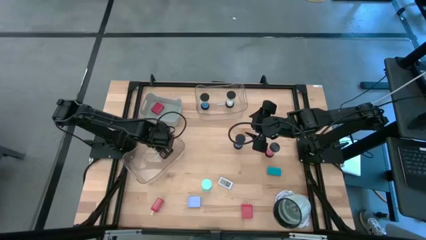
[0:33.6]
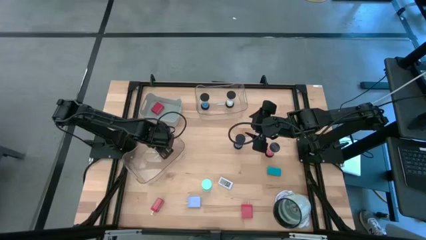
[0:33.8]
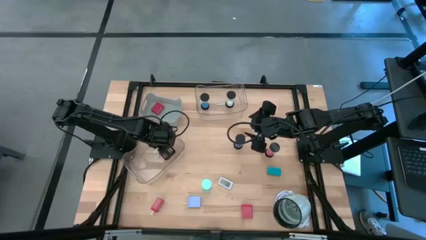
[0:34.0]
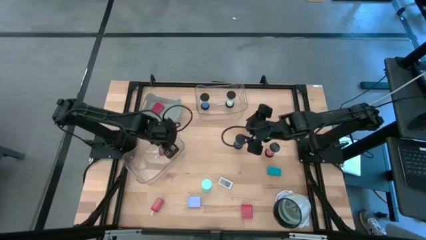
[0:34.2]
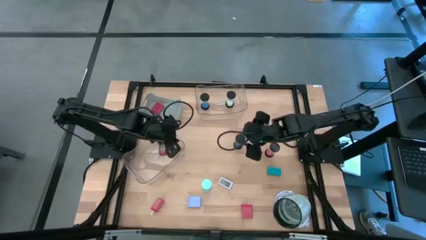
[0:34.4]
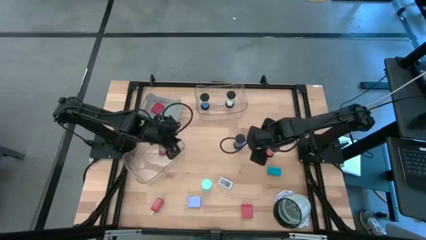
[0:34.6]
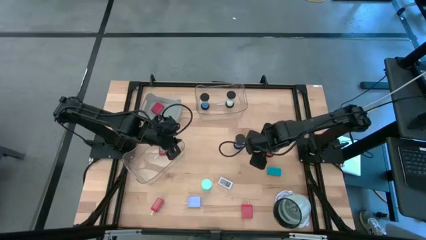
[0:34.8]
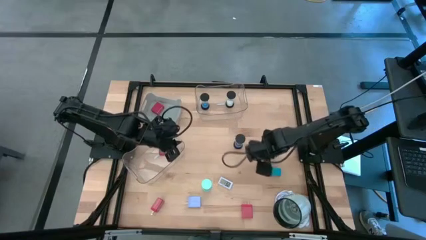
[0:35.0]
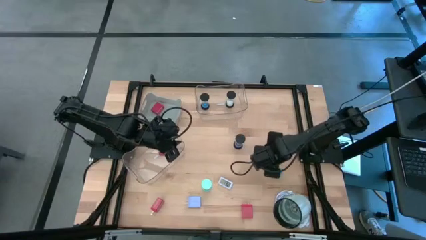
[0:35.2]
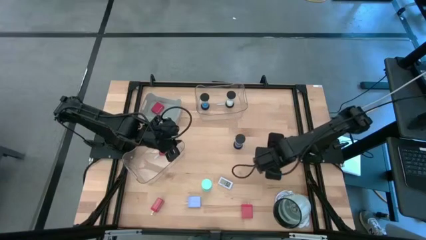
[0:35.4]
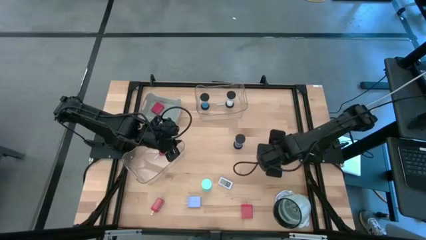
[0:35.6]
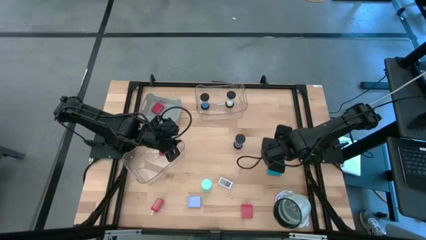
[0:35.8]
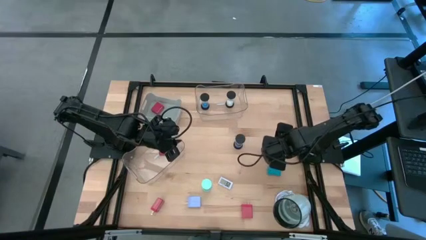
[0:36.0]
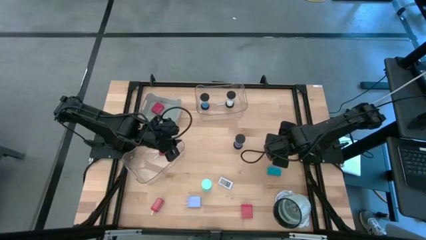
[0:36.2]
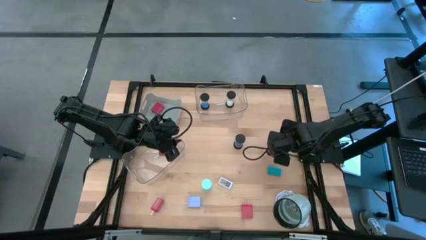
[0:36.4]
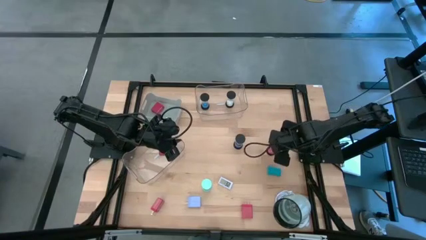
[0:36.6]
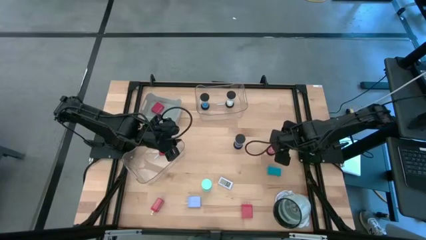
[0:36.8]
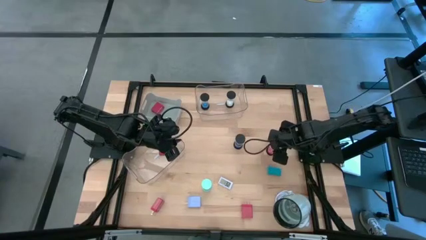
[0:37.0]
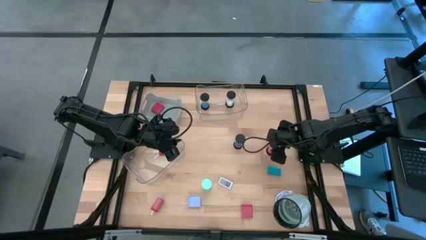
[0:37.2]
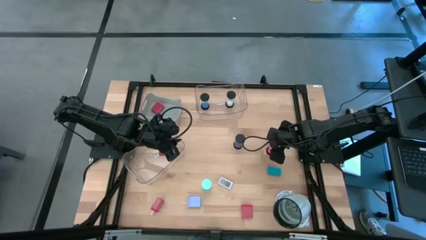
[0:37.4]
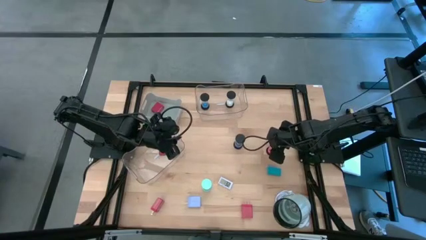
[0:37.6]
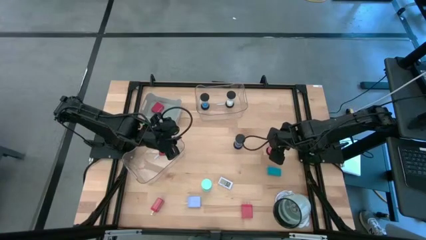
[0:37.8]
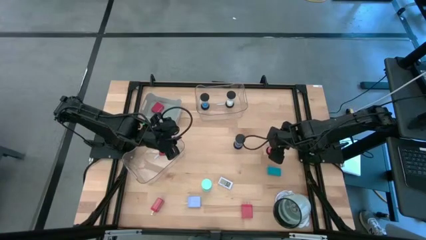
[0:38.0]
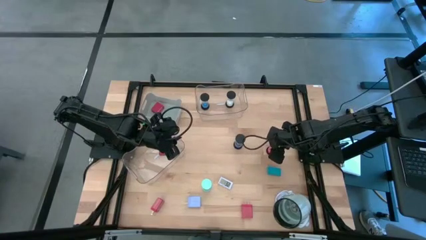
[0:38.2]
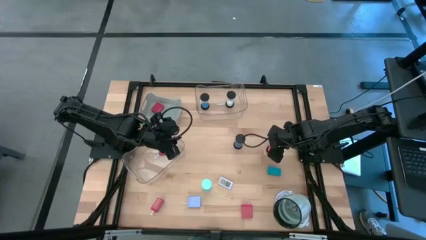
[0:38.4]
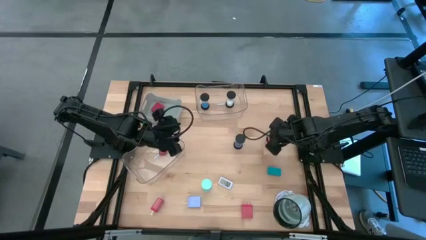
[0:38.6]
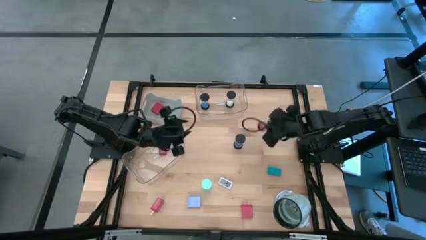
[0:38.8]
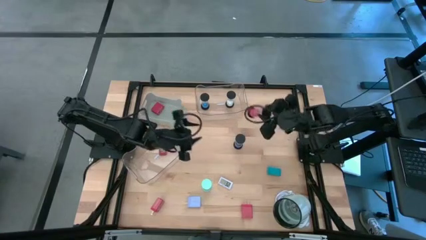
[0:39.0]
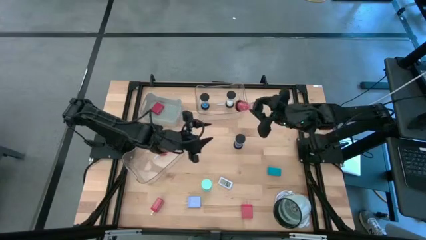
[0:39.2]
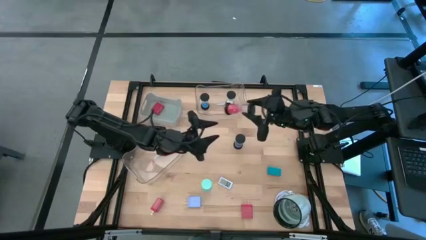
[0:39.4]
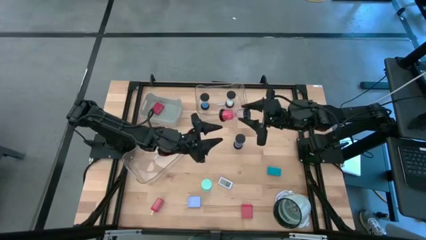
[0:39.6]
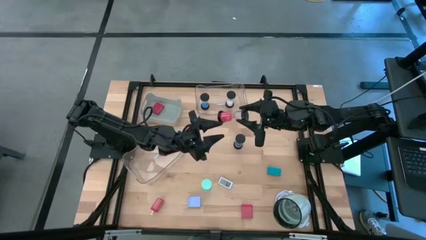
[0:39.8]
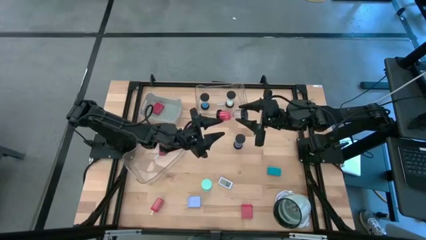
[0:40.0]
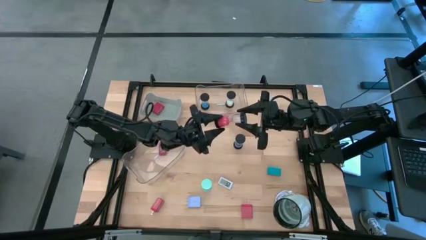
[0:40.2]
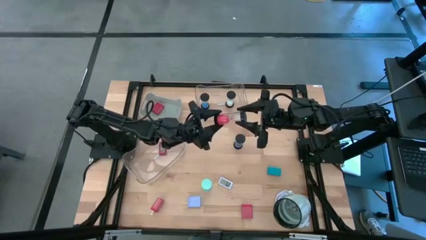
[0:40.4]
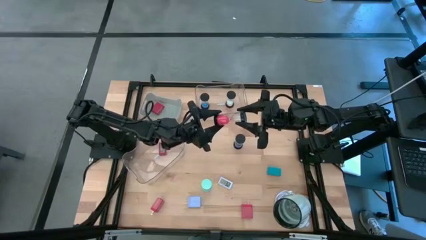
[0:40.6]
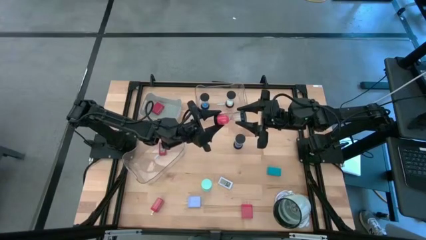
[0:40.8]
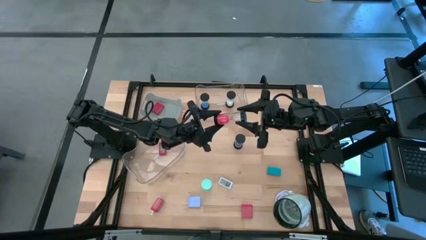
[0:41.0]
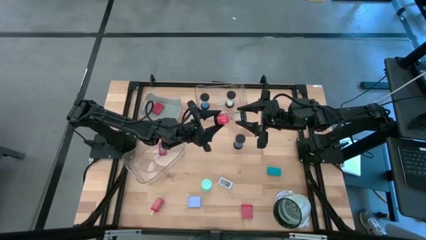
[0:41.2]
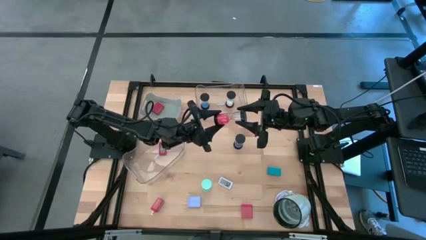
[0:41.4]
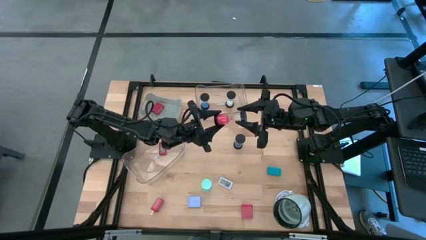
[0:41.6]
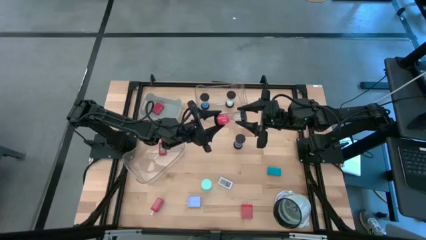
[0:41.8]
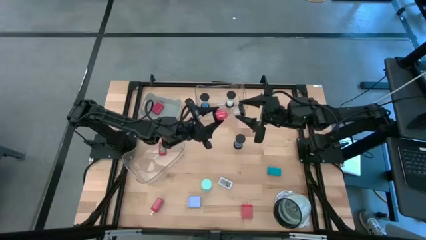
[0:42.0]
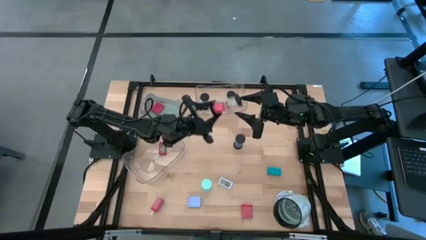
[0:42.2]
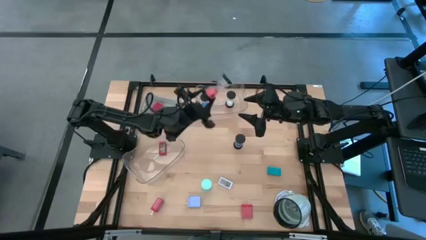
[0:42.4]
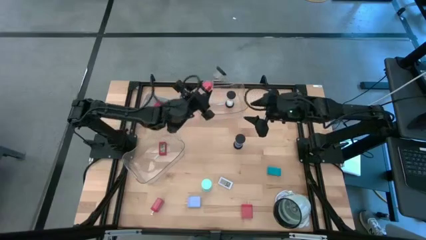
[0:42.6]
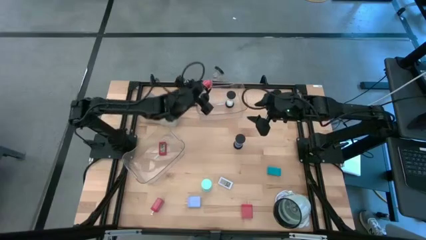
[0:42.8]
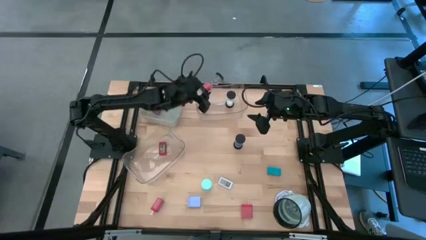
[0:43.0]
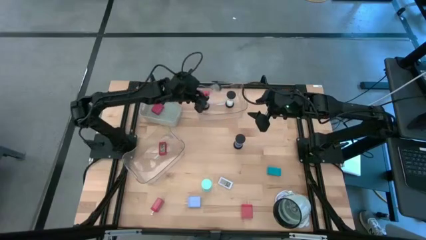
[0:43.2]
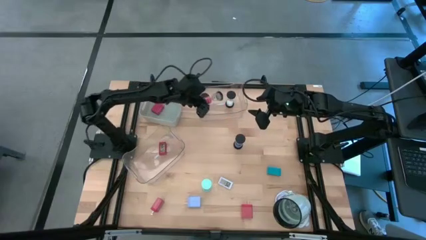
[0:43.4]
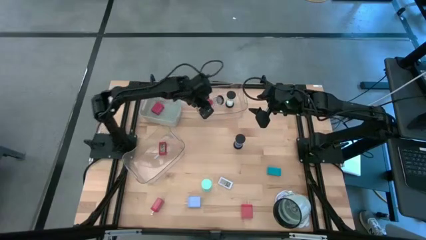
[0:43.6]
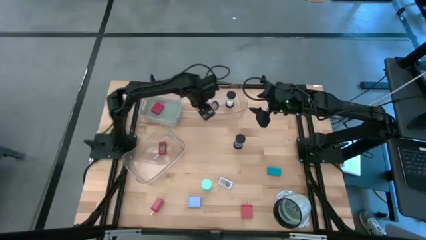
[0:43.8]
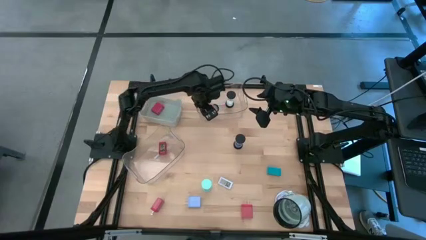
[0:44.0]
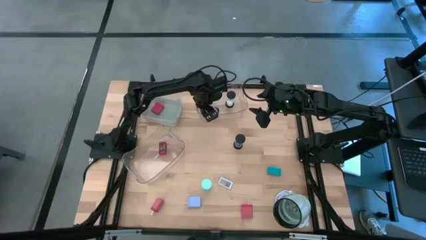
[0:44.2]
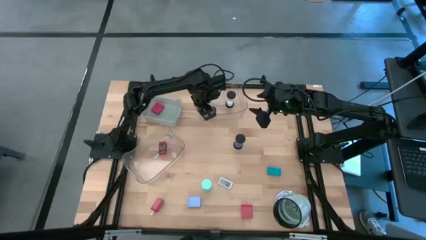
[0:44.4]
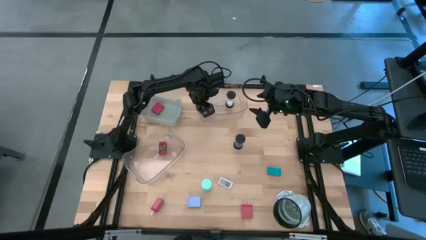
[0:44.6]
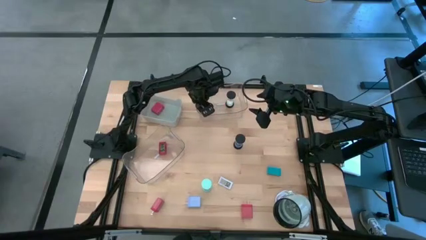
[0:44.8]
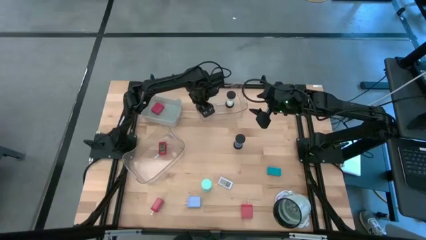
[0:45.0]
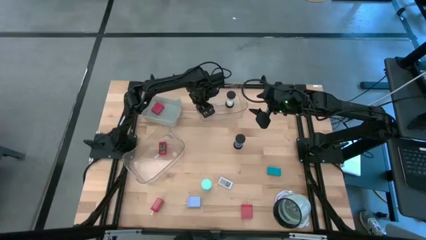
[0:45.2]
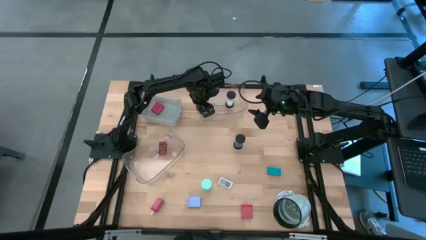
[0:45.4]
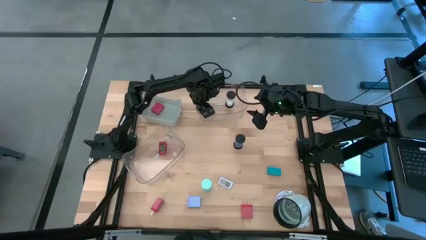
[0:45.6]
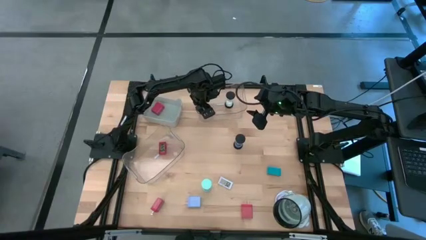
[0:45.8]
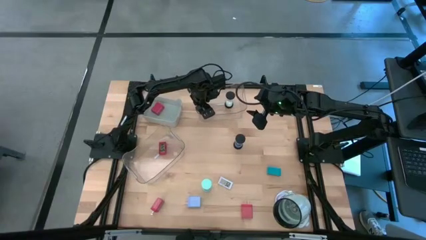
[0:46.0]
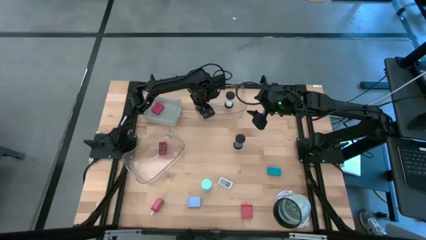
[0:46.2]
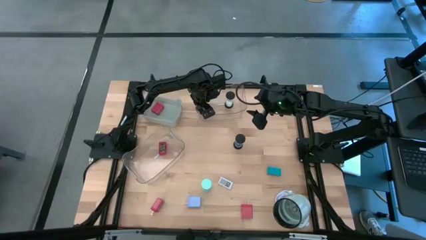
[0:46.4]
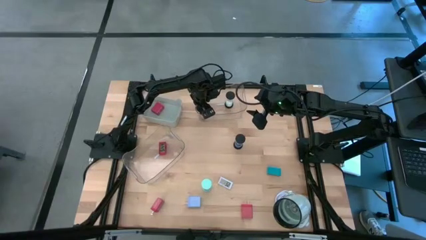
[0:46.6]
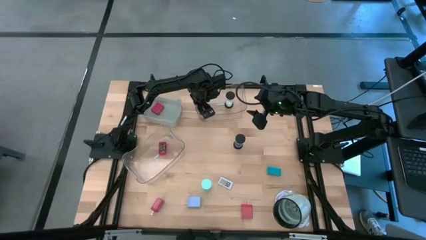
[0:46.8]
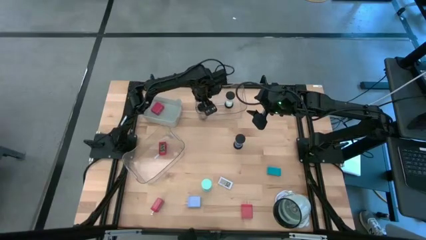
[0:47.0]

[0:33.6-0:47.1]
Task: Pick & Place Office items
Put the red hourglass into the top transparent bin
